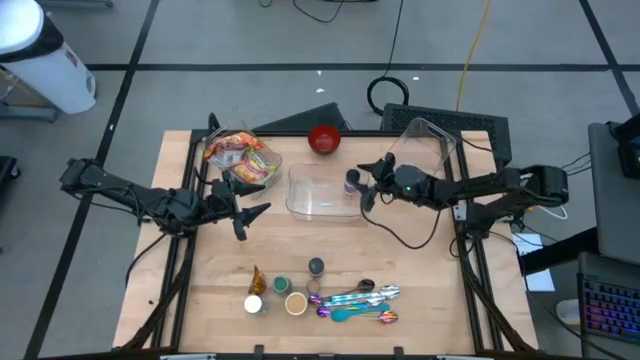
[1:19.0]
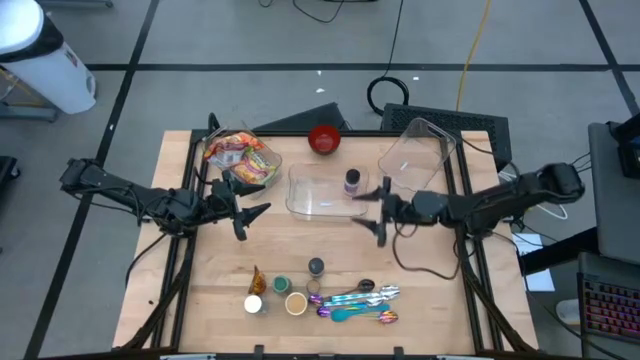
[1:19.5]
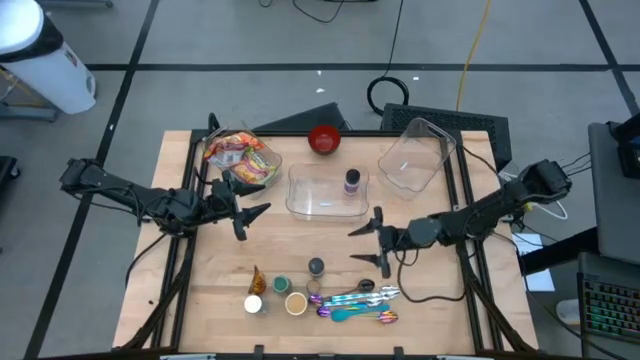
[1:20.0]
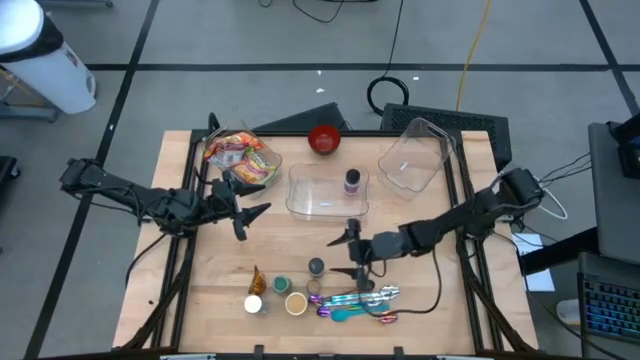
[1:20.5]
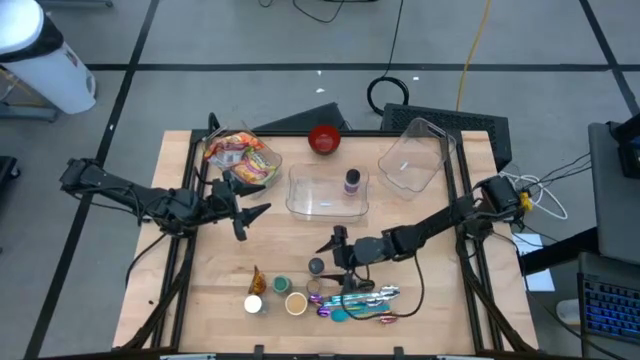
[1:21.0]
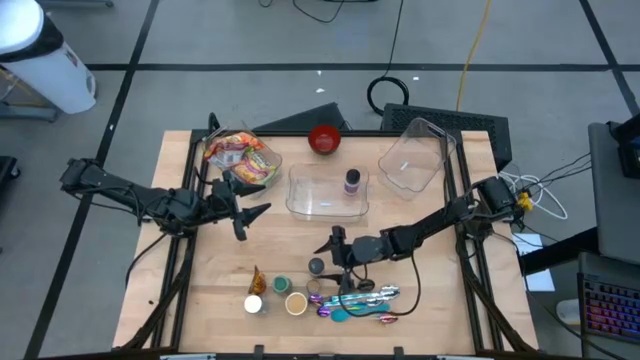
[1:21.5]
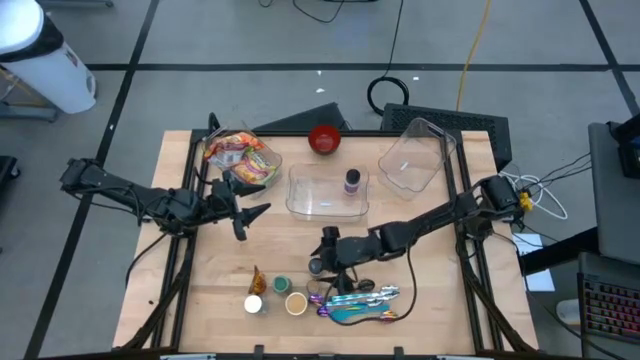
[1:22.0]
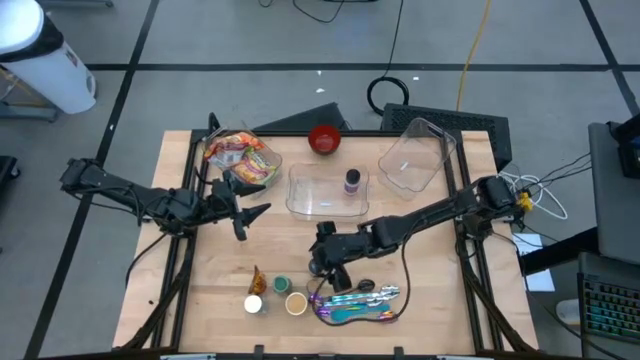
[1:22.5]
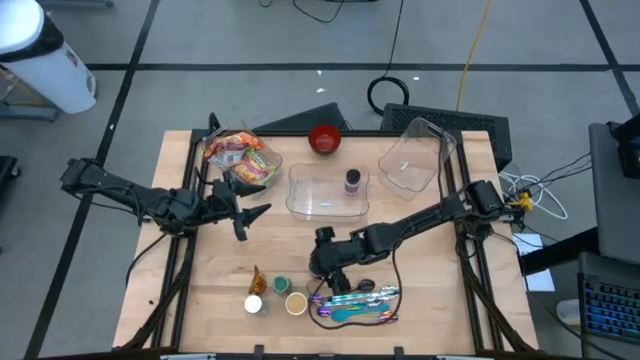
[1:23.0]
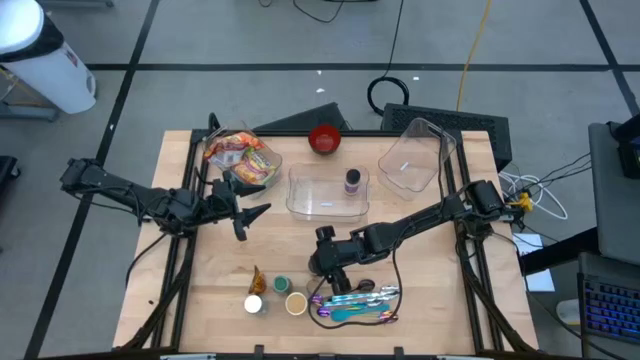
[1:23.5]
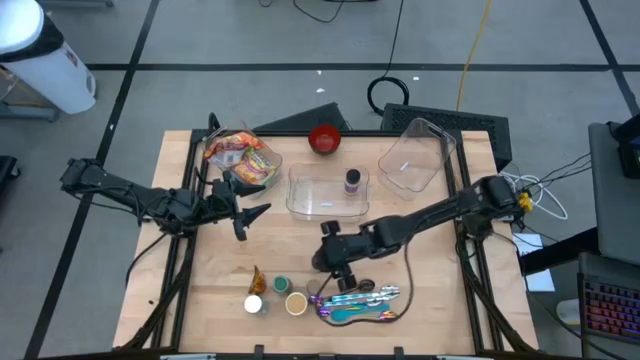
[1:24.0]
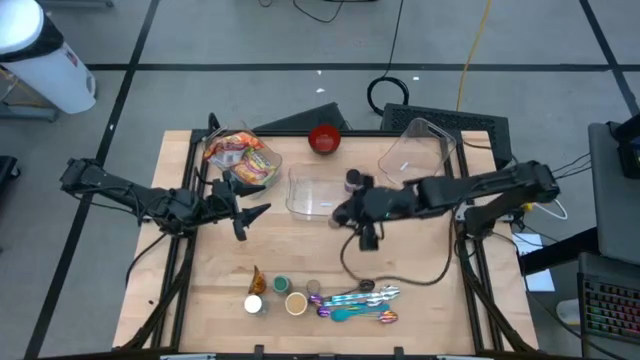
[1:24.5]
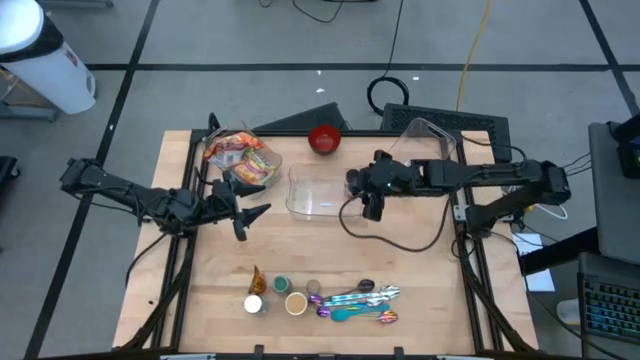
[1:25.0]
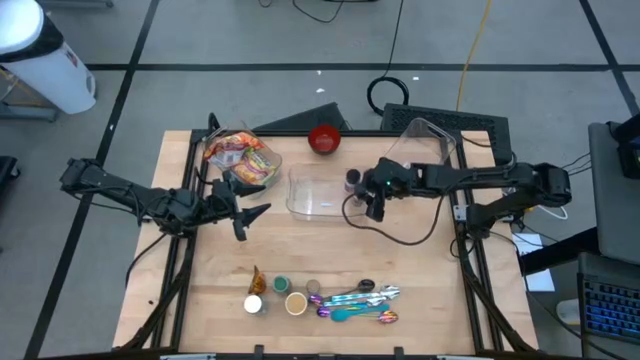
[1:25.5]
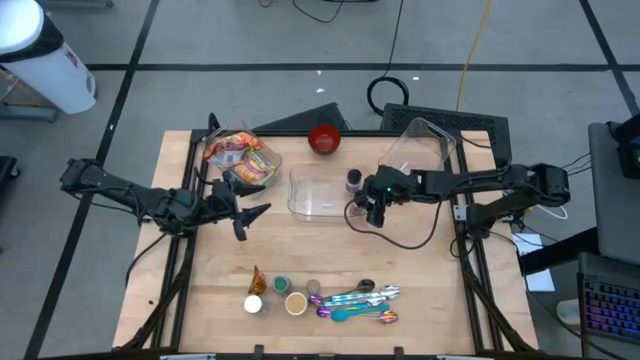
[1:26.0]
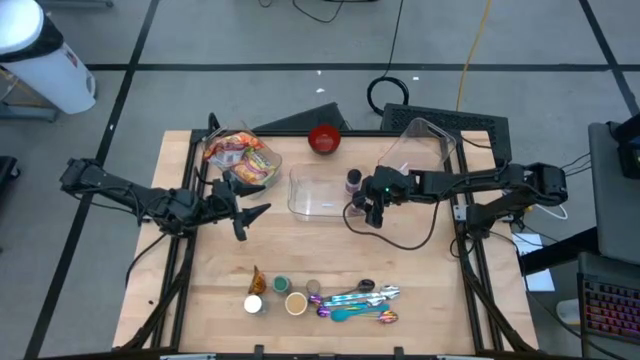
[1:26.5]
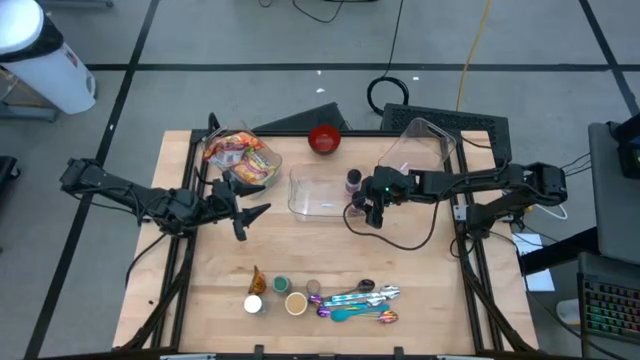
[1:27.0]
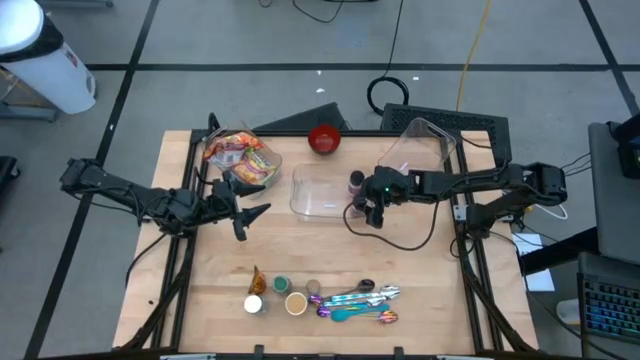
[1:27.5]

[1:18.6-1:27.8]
Task: Pick & Place Food Item
Put the orange seasoning bottle into the center transparent bin

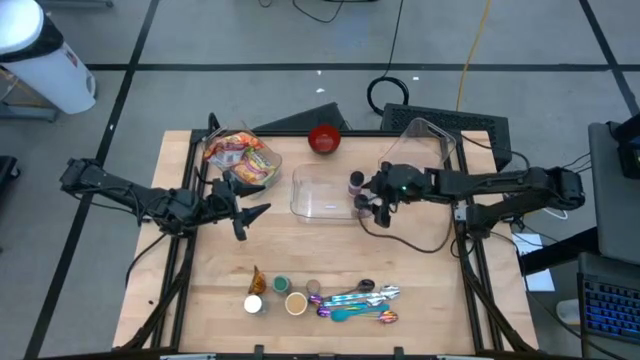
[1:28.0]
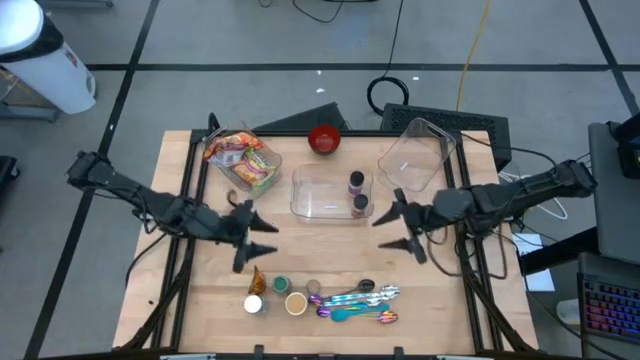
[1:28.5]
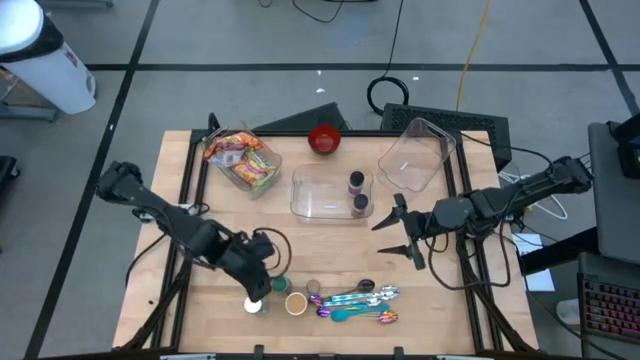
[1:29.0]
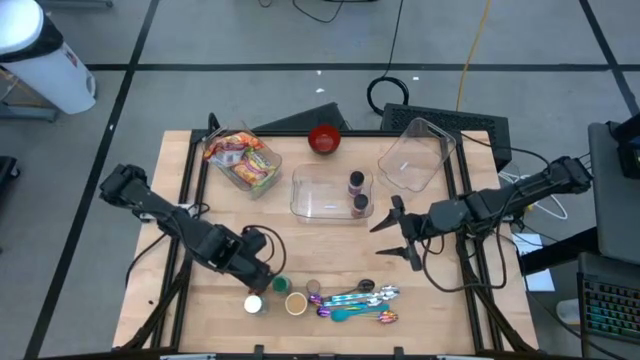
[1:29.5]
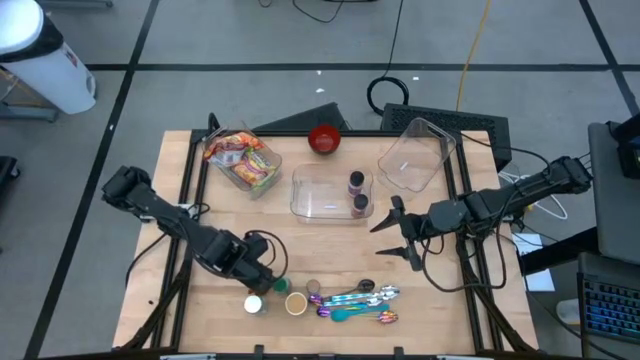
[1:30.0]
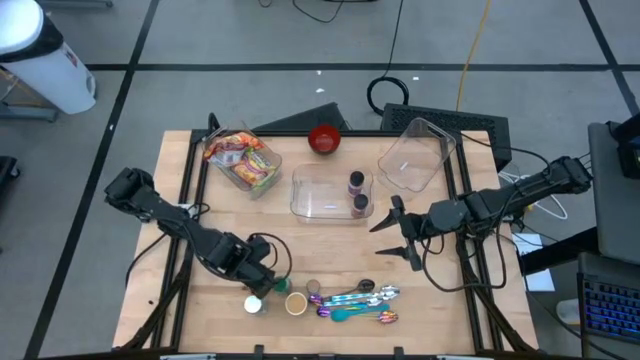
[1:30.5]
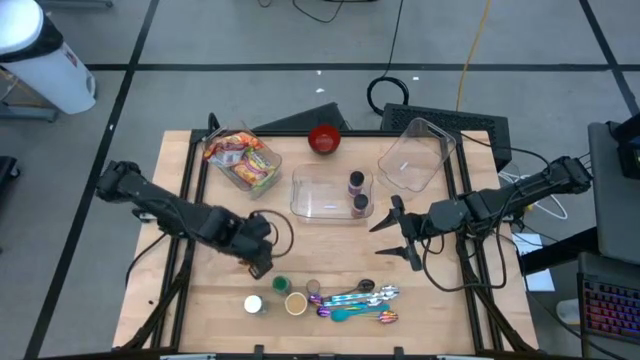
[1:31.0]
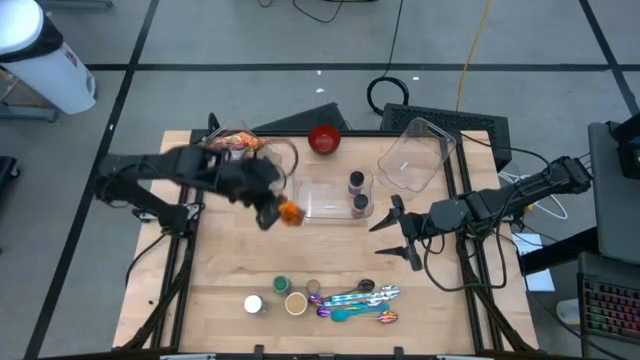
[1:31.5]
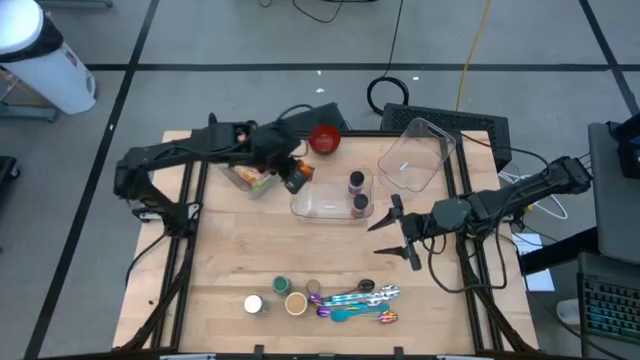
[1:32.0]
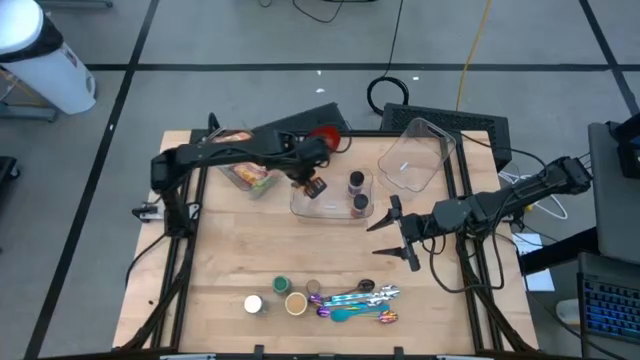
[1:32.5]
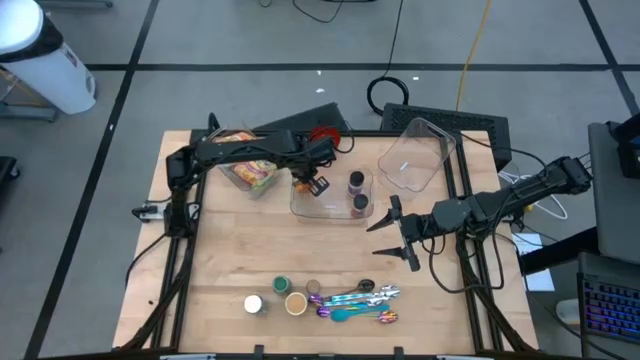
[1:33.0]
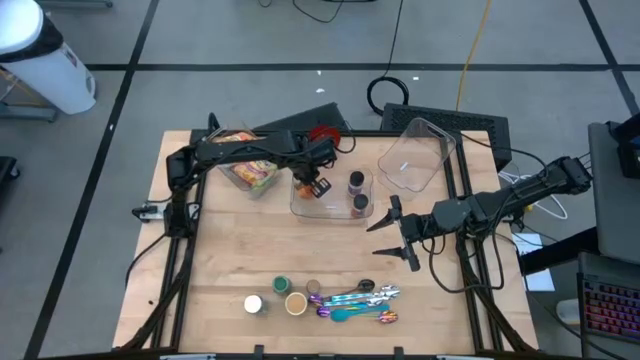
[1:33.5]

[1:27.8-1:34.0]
Put the orange seasoning pack into the center transparent bin

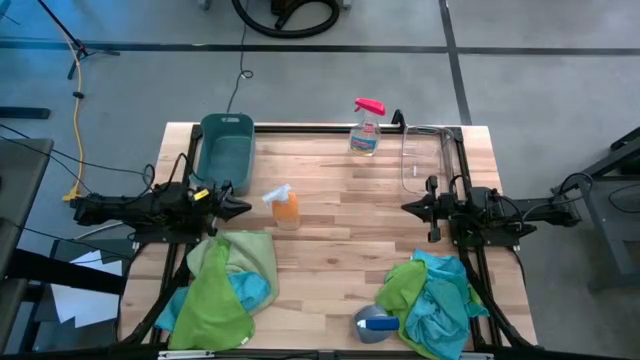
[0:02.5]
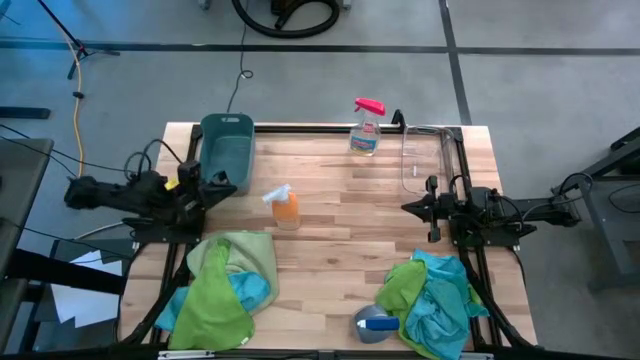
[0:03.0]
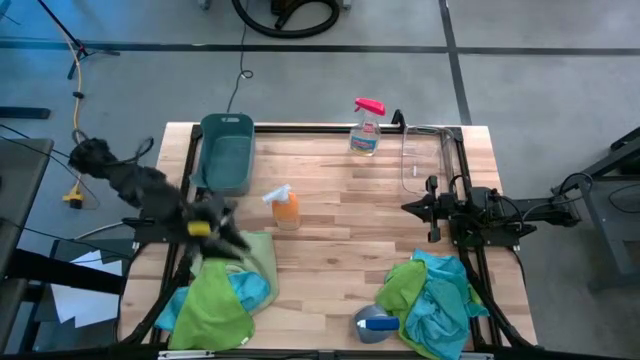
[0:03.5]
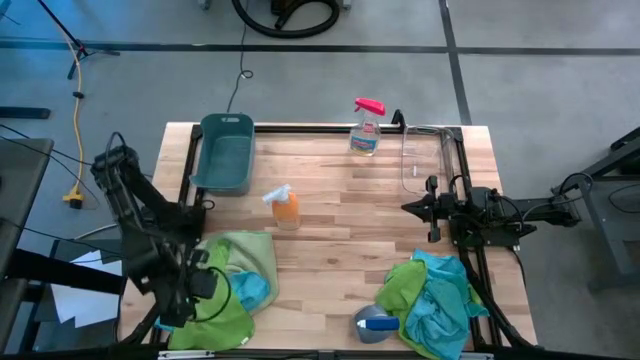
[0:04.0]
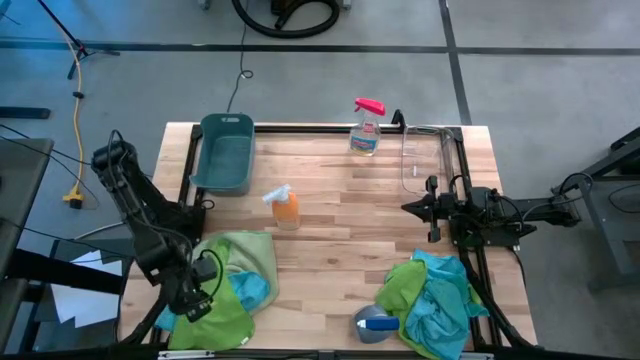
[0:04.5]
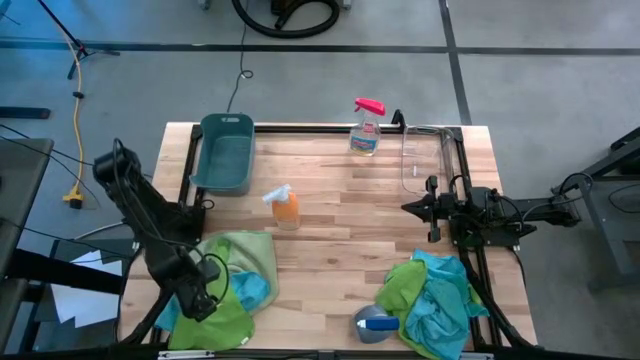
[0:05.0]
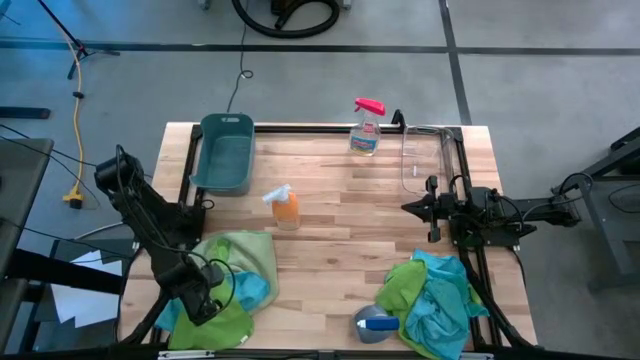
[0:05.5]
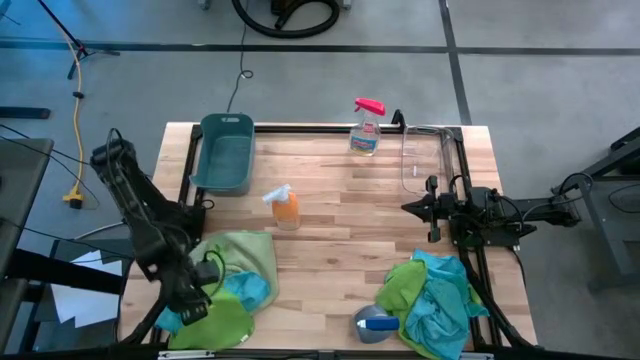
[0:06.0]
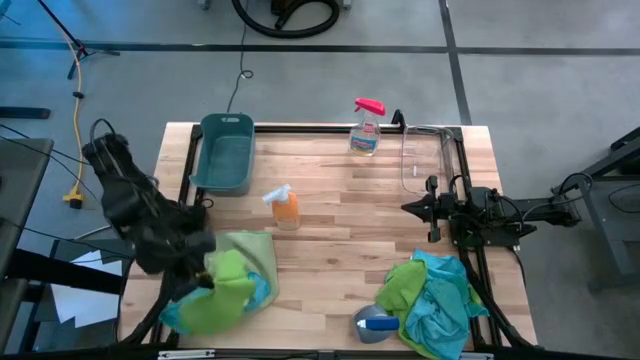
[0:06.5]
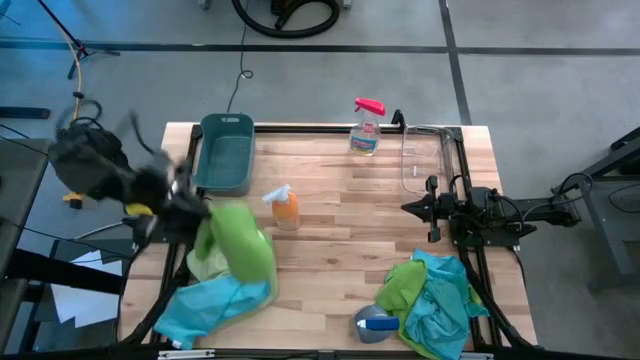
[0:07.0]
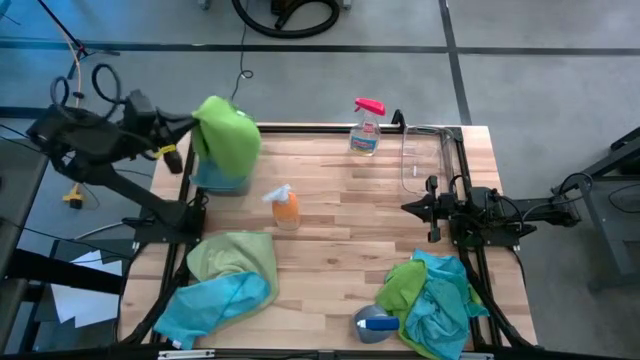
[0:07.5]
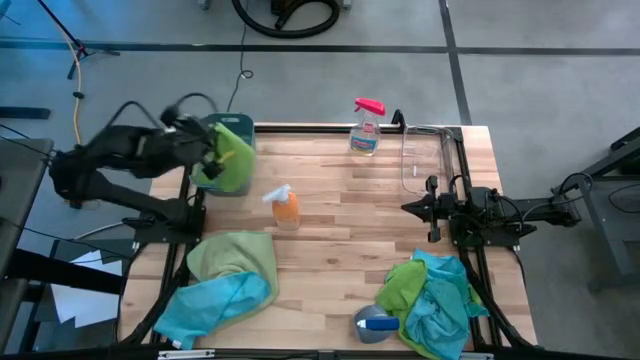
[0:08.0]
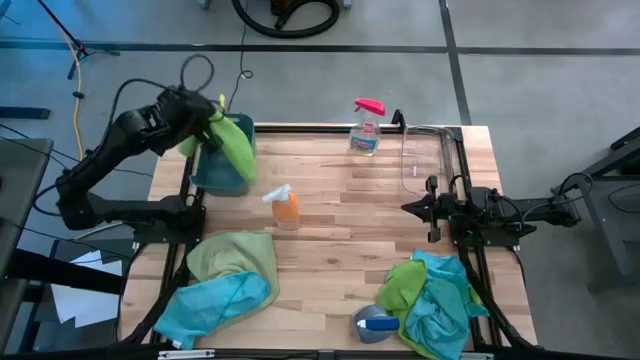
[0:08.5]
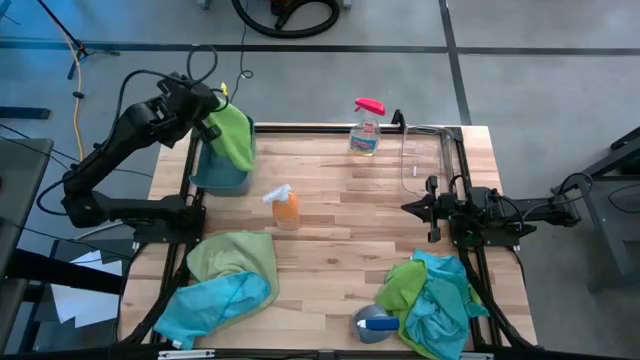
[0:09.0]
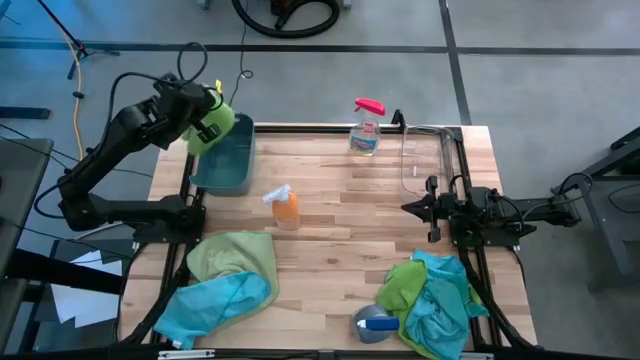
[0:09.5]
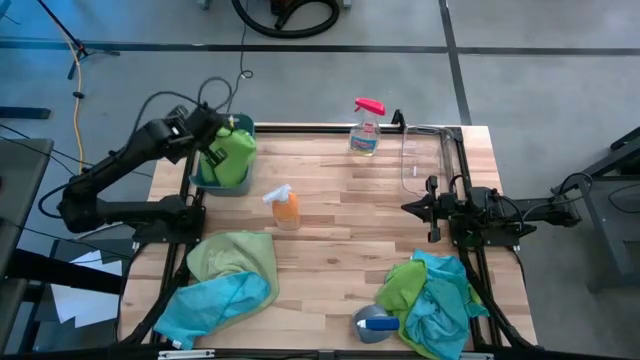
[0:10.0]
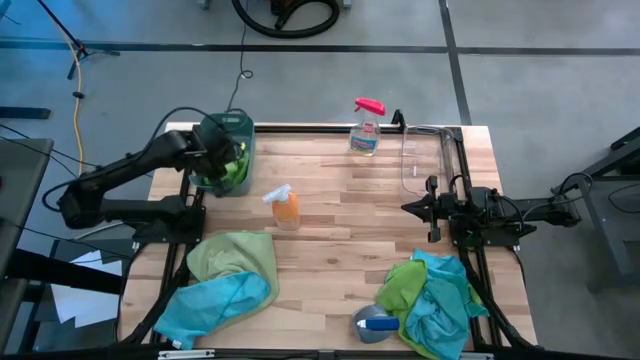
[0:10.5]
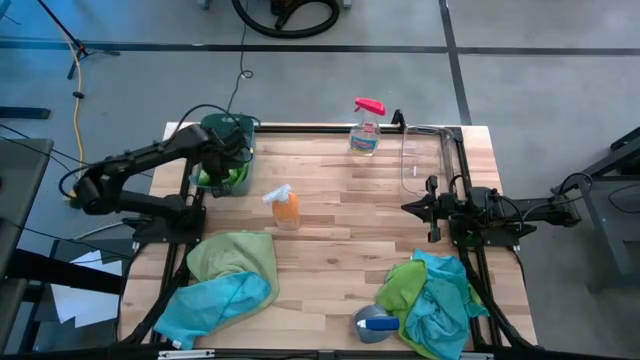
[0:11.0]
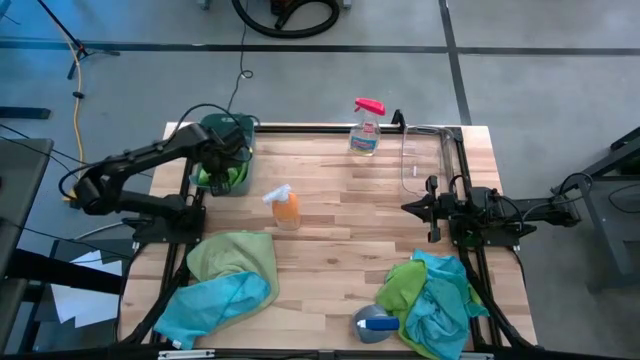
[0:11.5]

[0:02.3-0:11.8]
Task: Sort microfiber towel by color & place in baskets
Put the green microfiber towel into the green bin
